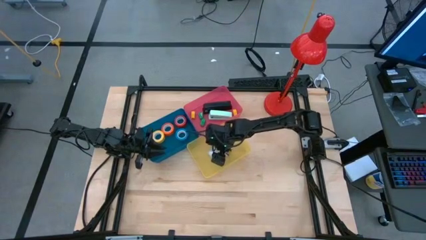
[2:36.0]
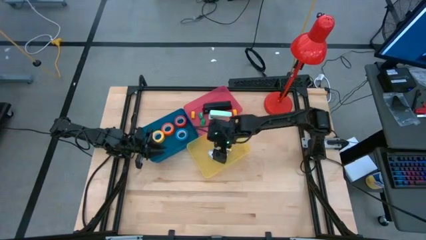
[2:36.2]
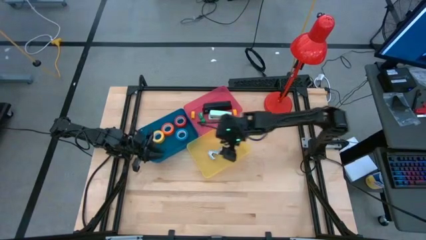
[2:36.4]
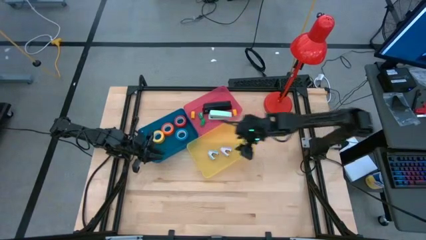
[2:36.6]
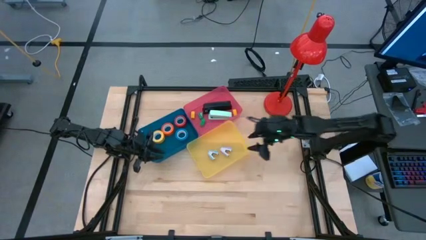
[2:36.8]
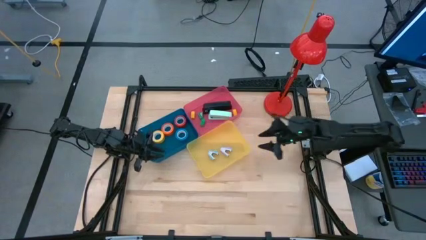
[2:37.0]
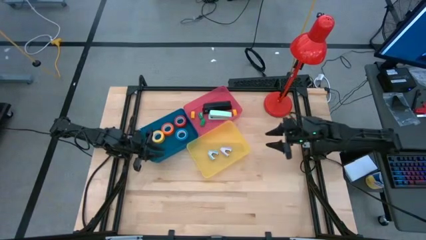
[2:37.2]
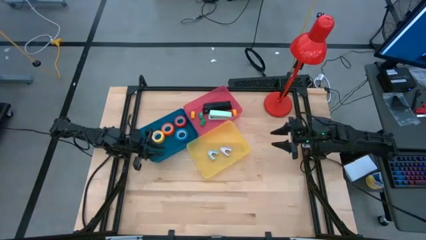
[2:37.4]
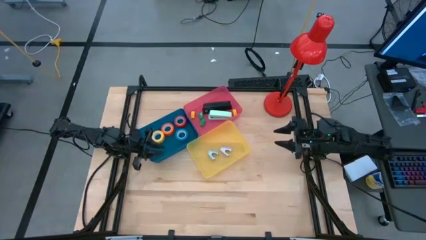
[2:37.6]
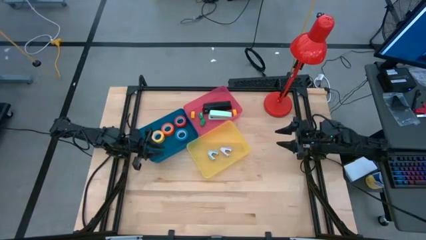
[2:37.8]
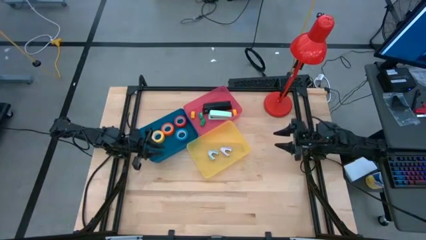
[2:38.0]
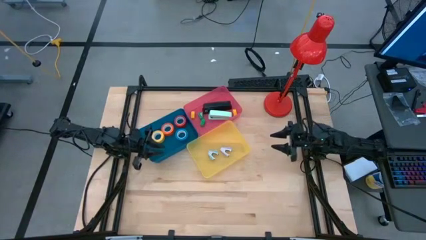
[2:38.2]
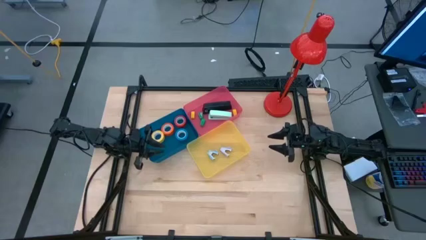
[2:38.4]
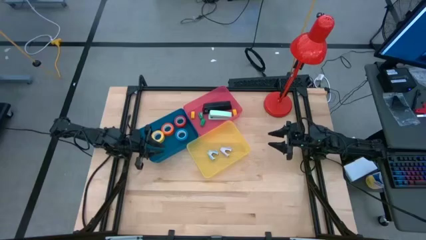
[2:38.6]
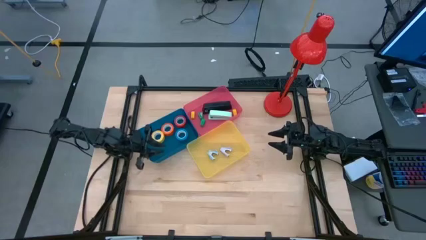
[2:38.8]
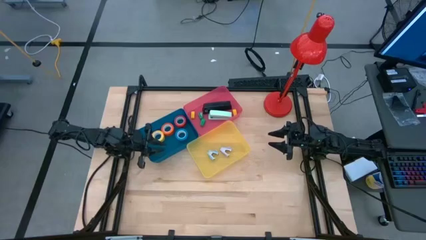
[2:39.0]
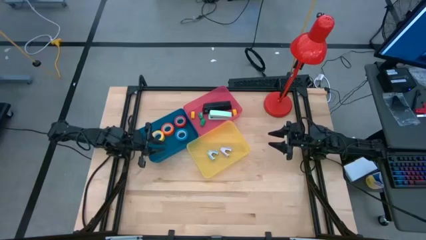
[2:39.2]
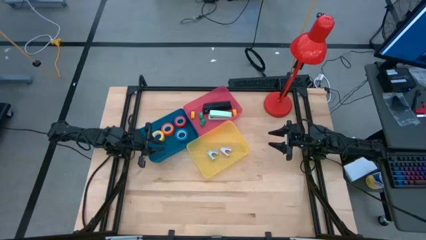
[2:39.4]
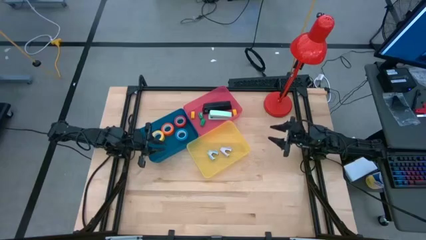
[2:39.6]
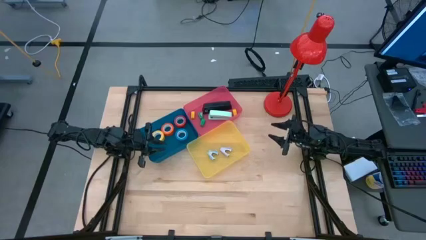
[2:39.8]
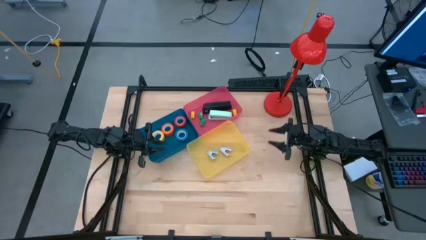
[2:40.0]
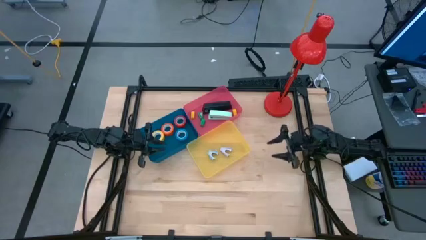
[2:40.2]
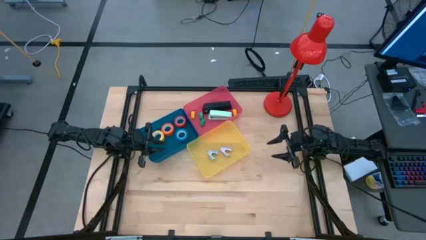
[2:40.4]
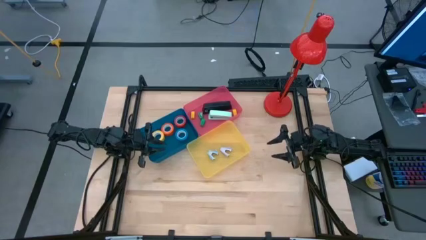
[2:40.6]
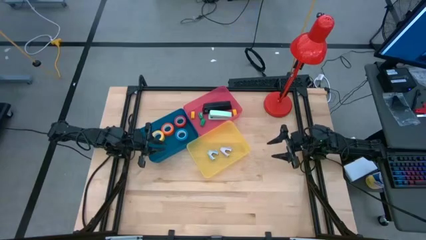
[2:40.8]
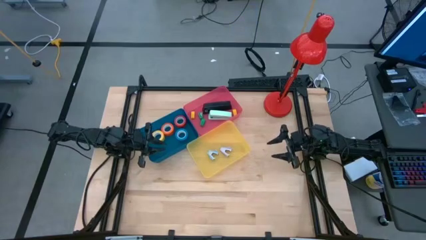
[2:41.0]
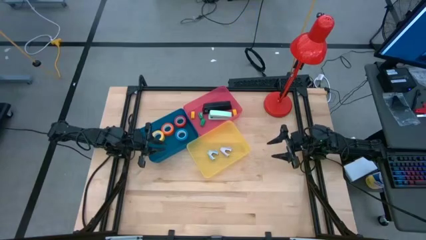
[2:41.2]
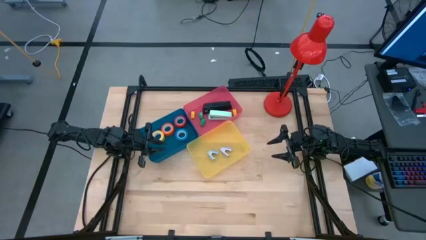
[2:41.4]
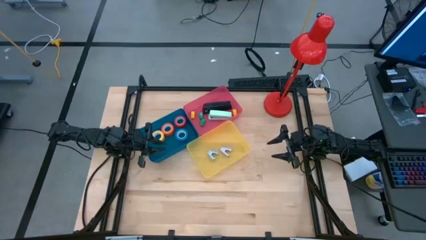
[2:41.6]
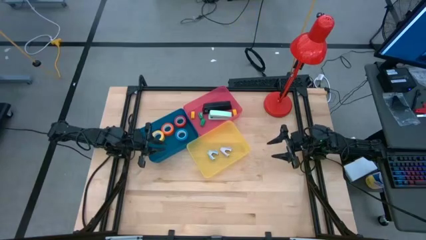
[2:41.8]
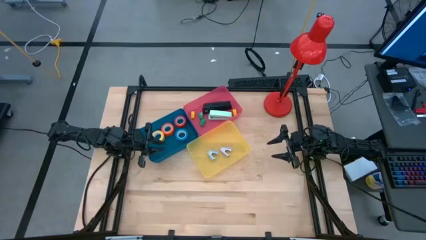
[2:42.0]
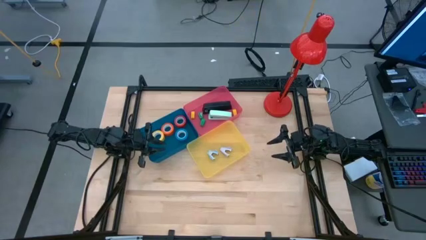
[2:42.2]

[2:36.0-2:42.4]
Task: Pick and place Stapler, Stapler remover, tape
Return to Home Position

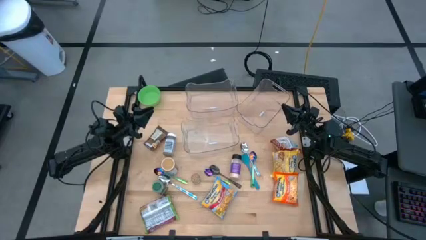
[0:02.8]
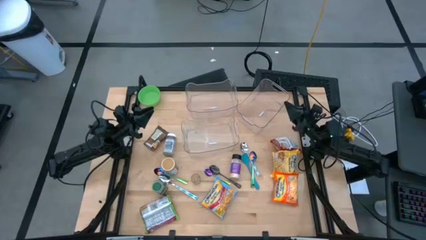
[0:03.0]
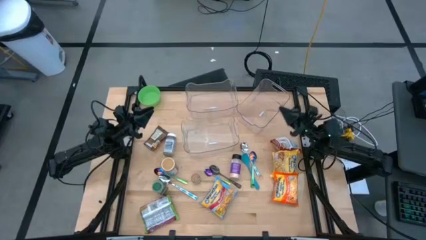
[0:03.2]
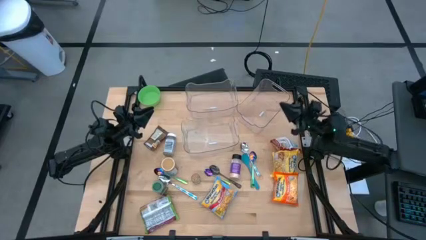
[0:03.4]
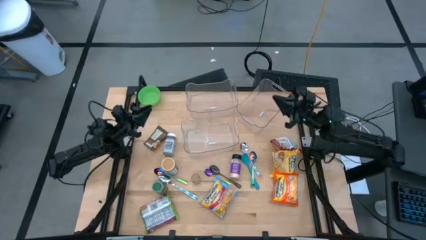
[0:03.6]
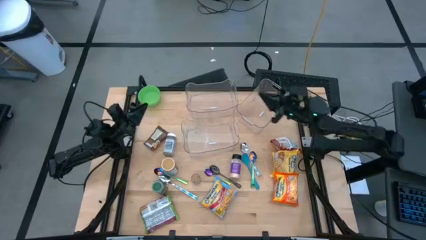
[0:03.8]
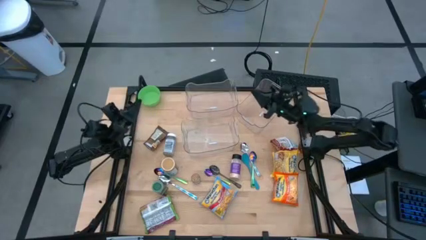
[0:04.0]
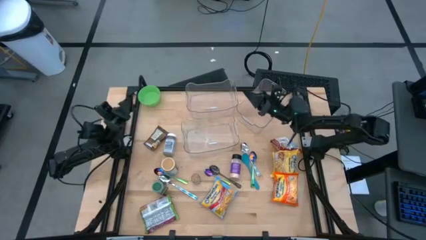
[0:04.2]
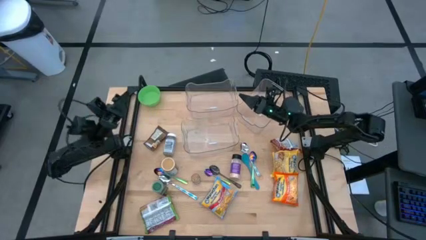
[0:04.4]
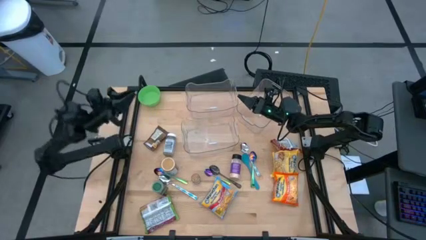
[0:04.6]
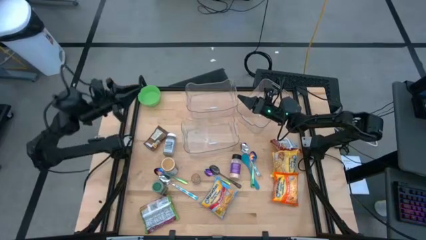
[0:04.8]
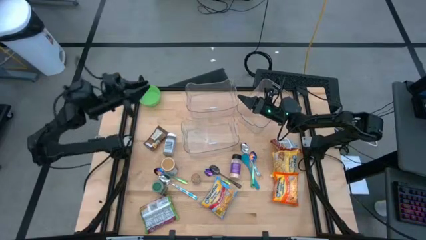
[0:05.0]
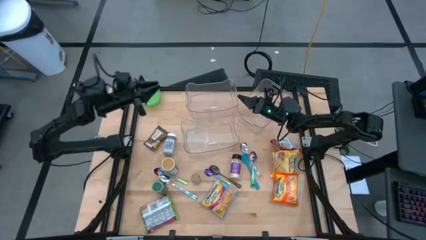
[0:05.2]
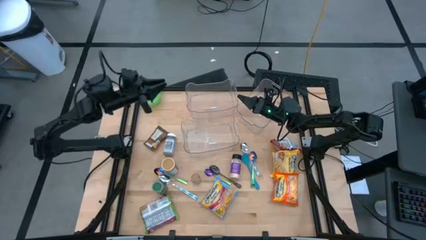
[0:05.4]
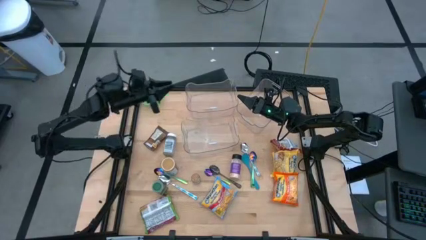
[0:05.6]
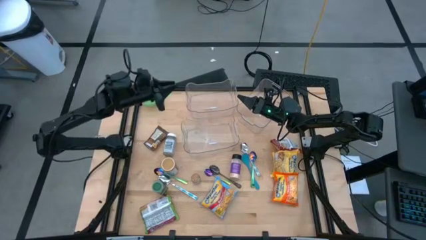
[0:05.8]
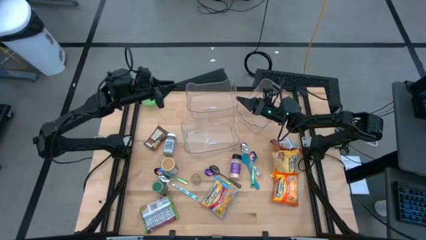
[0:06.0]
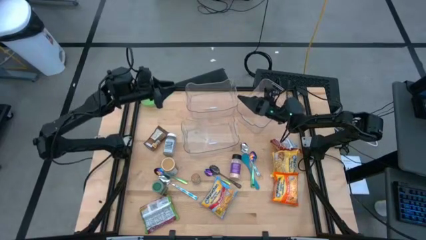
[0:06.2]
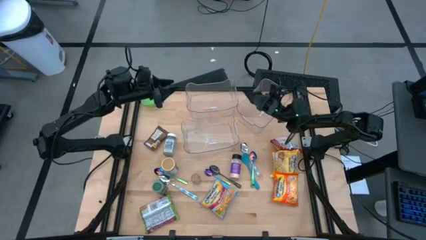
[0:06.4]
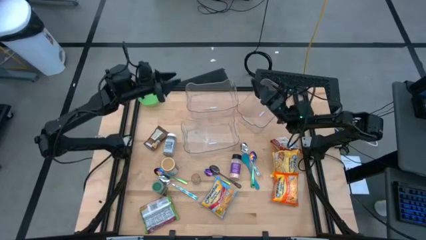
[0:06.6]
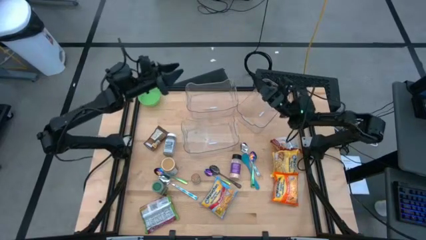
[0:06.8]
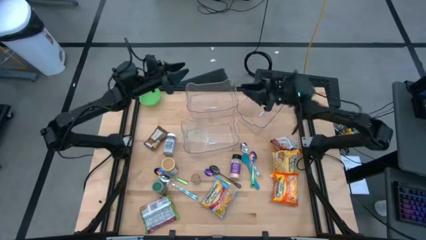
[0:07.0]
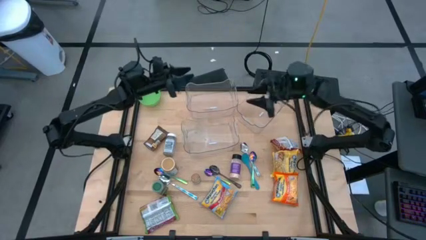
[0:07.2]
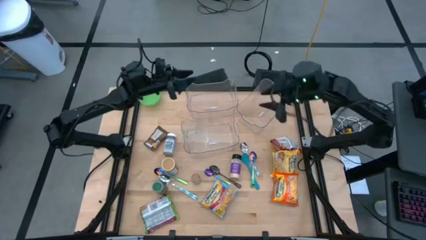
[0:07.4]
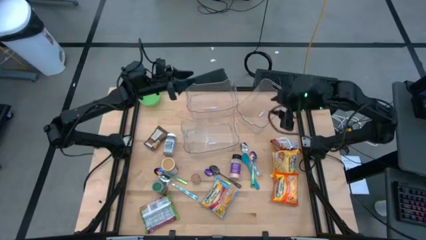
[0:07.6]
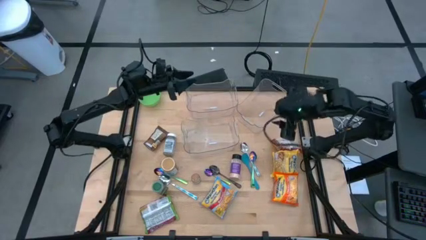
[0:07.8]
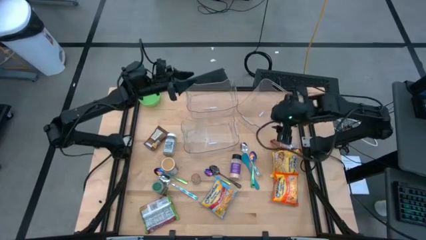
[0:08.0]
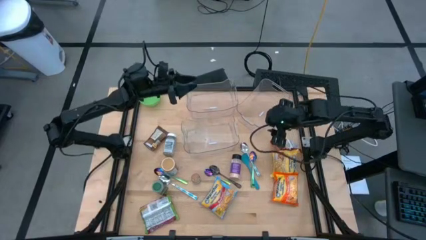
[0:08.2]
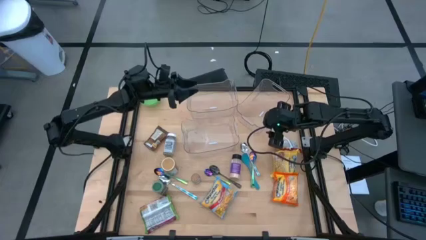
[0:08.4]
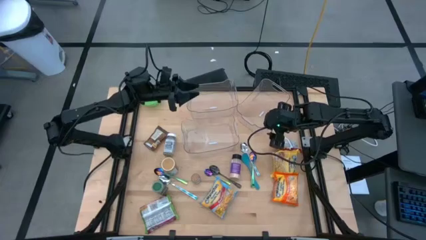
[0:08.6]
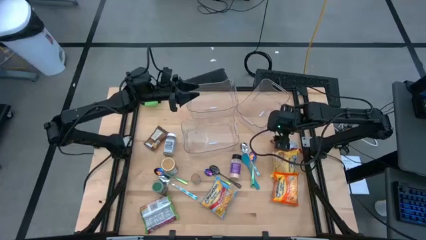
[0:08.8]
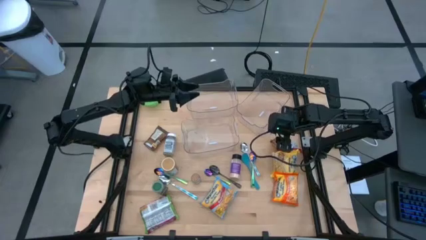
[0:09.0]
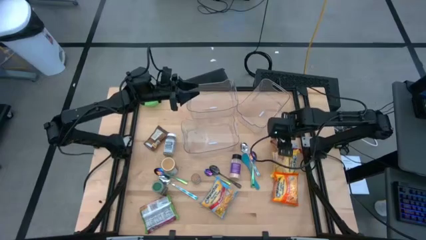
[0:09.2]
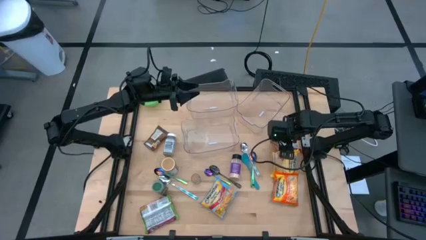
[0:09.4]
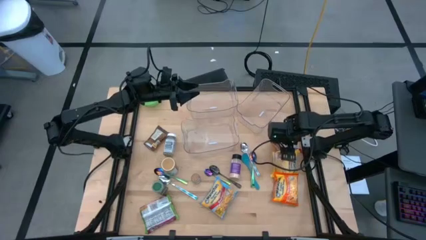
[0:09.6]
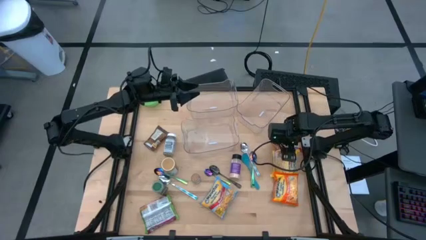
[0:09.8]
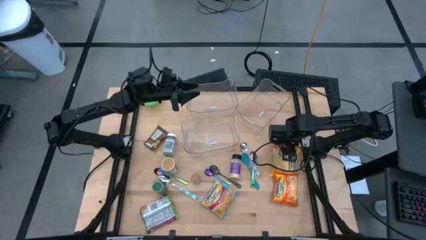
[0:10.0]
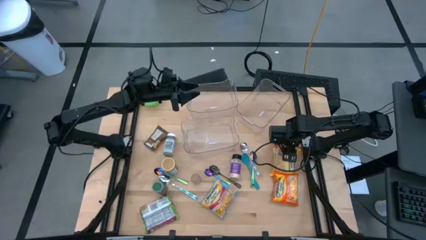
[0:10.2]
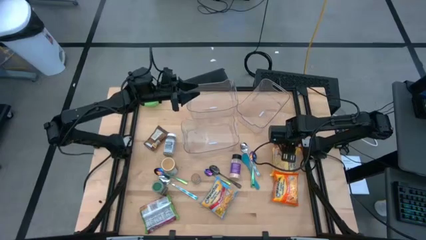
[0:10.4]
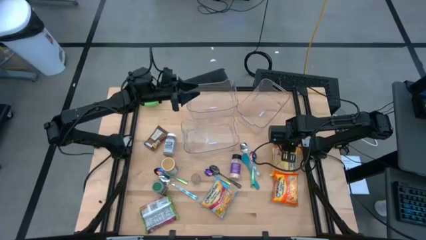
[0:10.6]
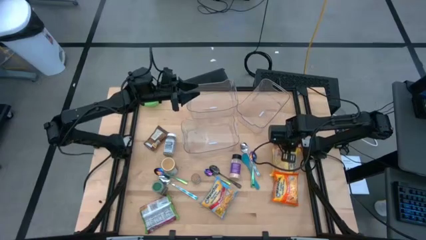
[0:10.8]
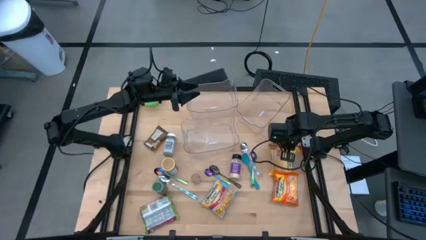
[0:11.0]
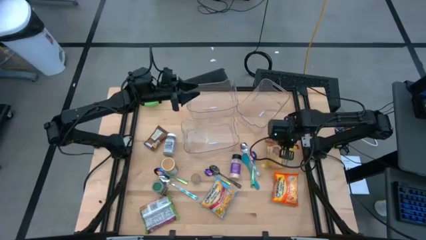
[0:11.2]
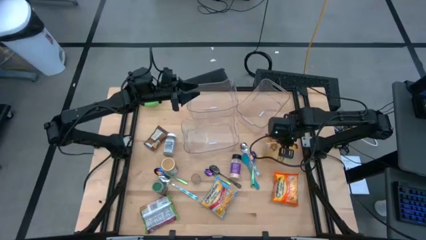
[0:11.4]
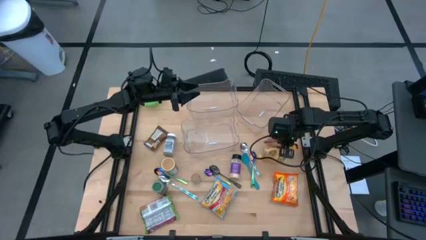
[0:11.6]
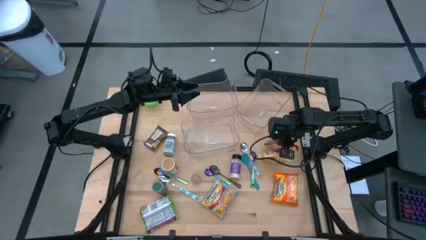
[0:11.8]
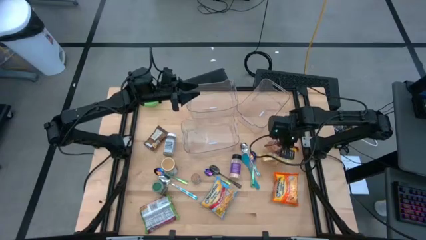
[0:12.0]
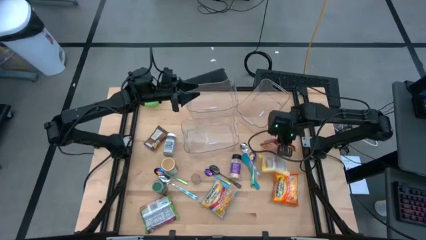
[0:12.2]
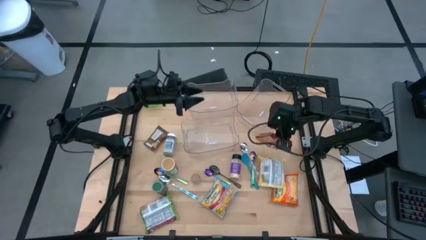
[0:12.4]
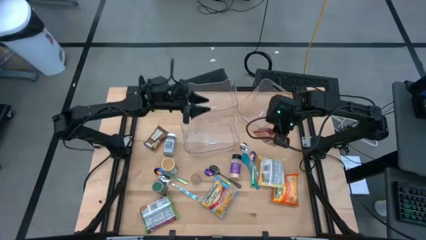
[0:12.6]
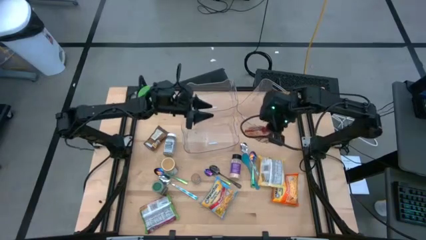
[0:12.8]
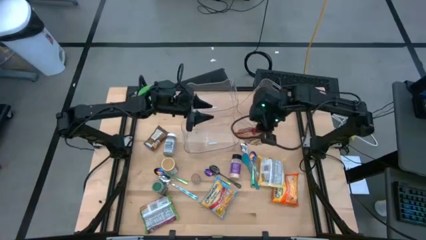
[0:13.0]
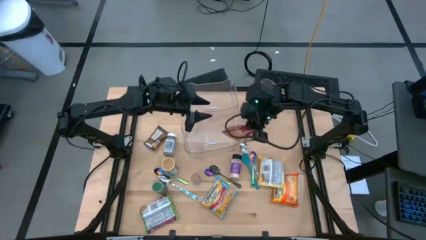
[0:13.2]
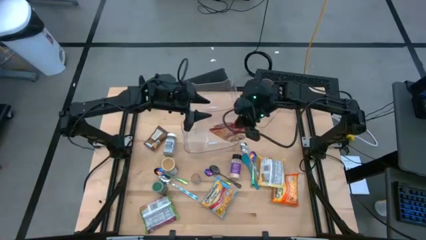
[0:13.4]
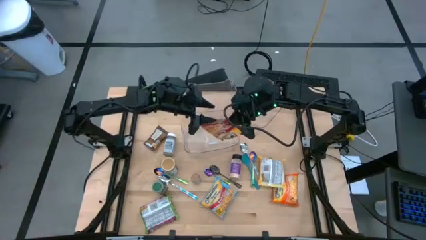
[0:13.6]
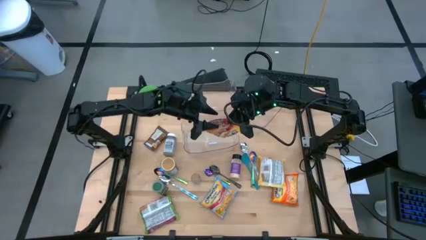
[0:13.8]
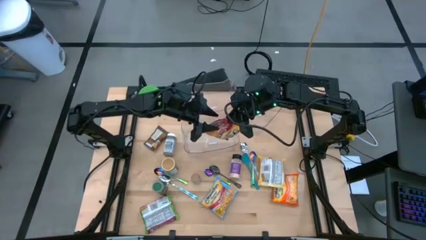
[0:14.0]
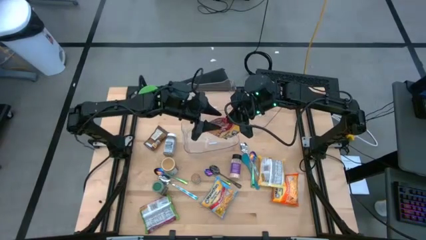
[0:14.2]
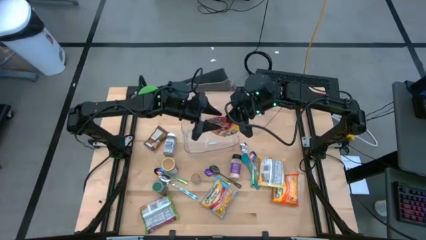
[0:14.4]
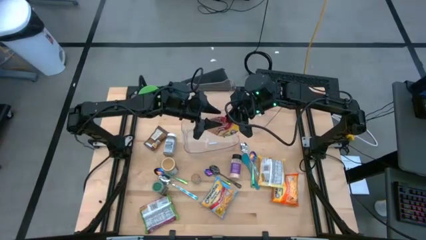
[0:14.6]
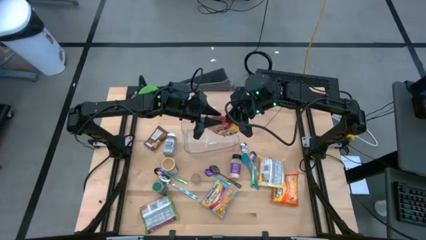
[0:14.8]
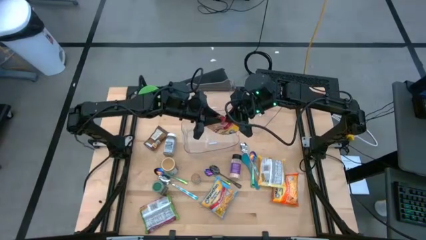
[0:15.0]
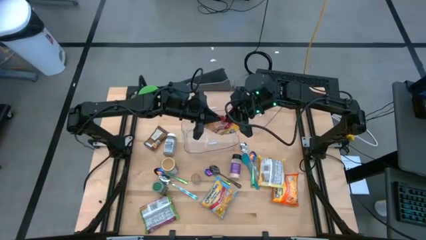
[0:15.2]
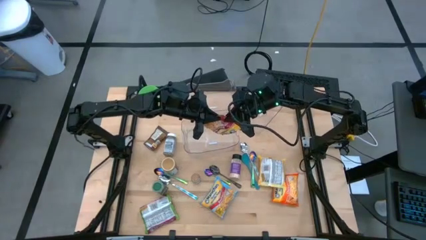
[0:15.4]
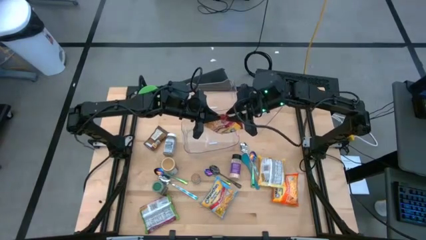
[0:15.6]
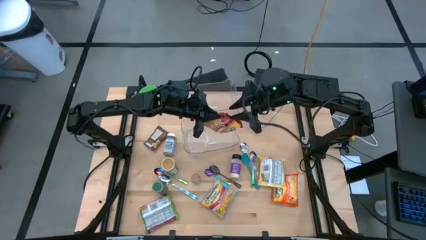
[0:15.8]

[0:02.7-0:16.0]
Task: Pick & Place Food Item
Put the red noodle pack into the top left transparent bin
